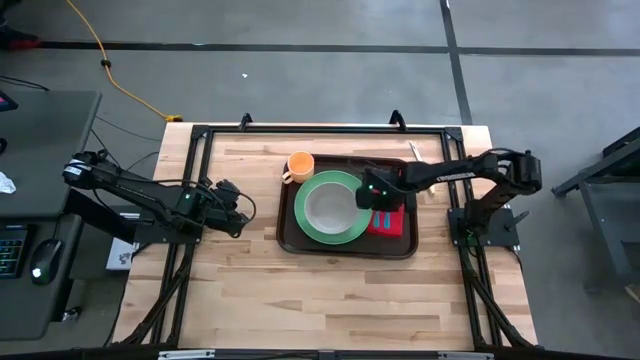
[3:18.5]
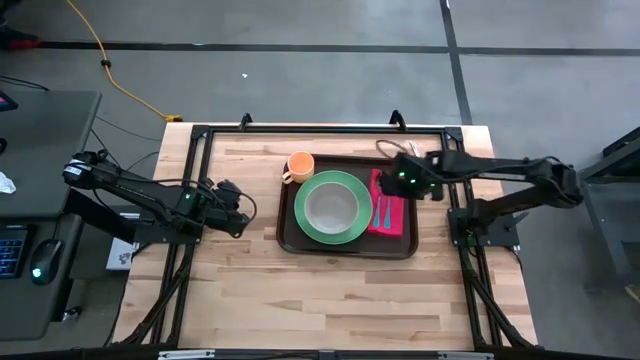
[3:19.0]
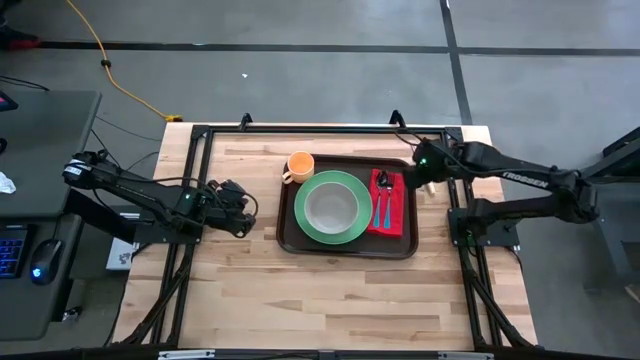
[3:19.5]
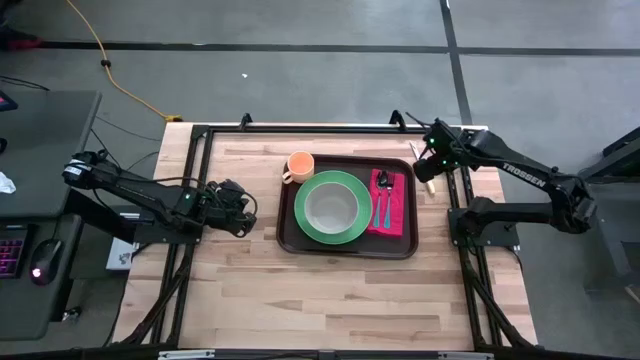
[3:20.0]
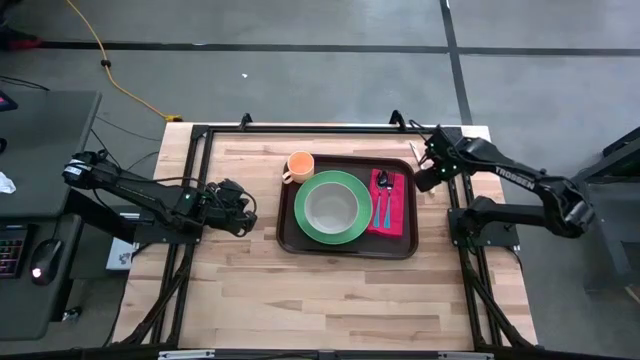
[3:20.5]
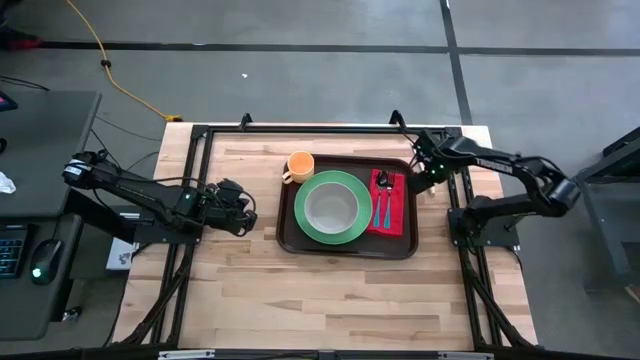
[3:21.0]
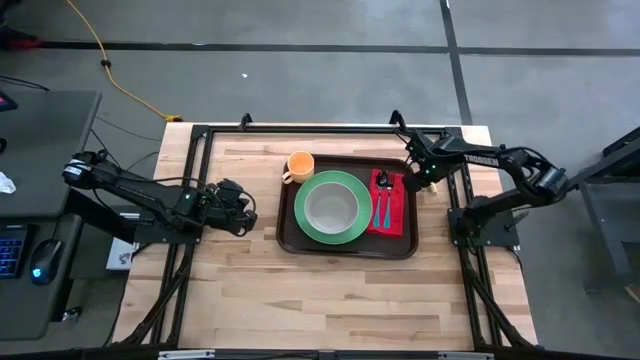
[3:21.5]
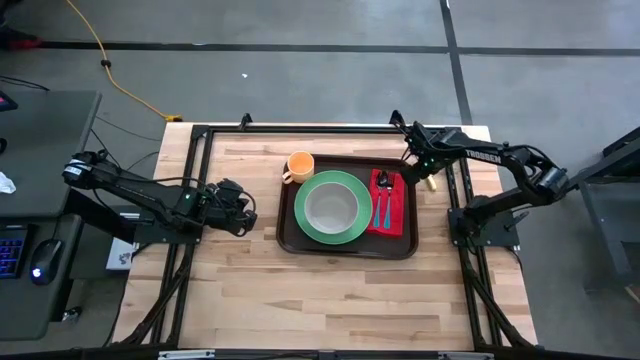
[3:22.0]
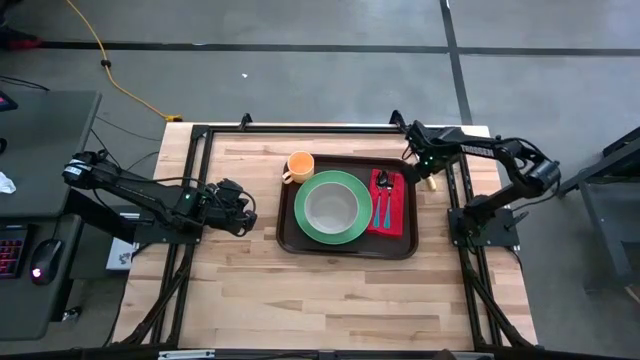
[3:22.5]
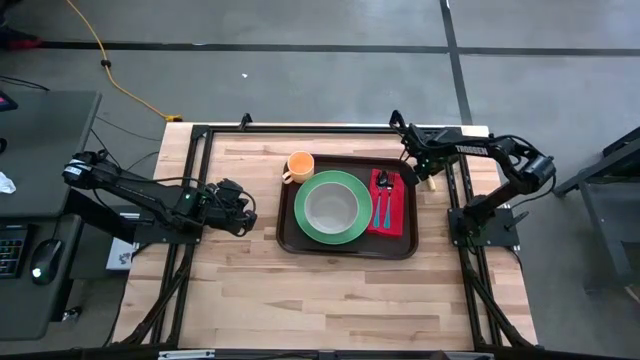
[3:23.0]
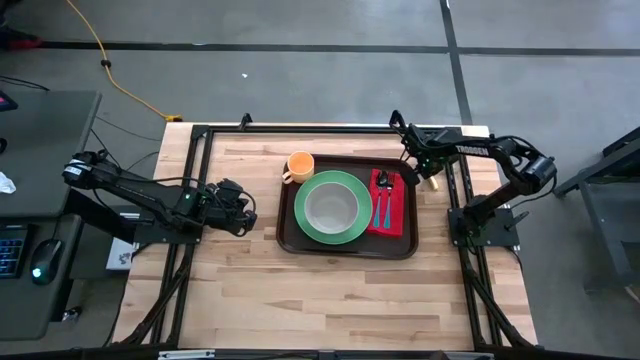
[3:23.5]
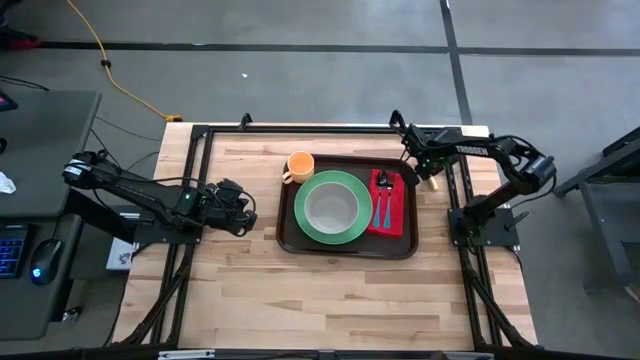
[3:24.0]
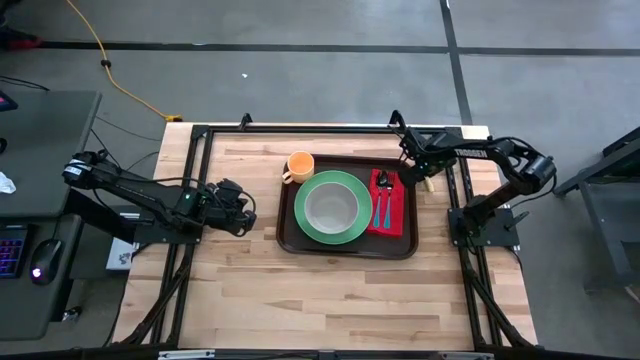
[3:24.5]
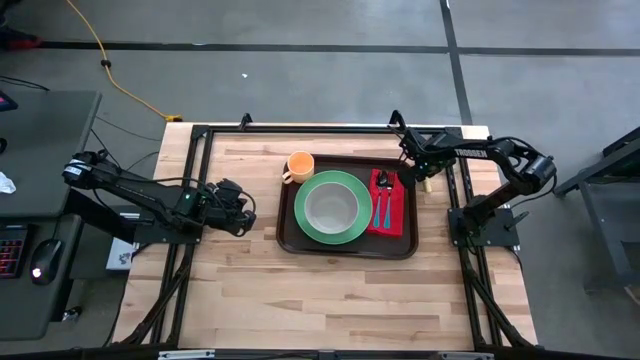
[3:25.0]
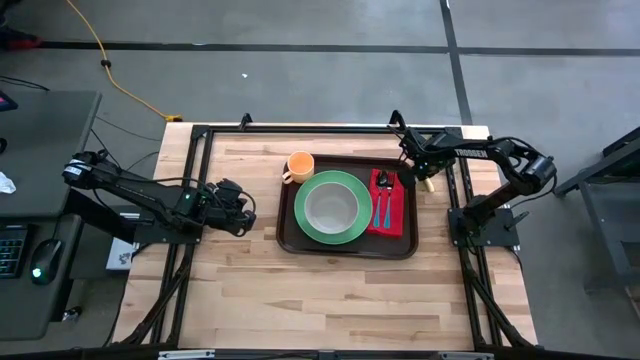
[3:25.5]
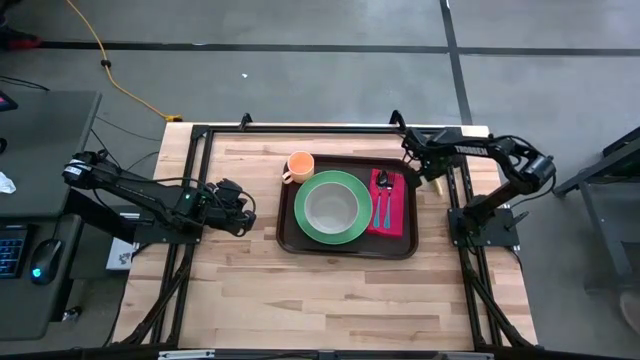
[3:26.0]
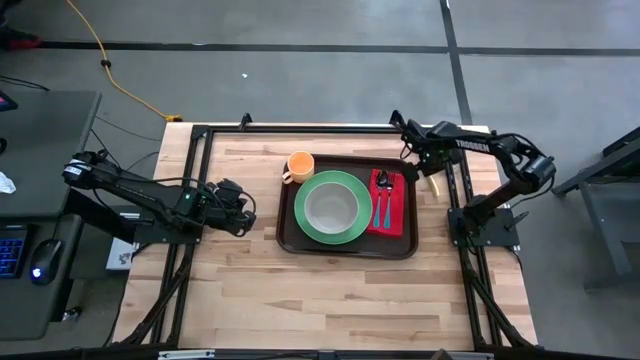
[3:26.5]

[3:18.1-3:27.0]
Task: Set up tray
Put the yellow table knife on the red napkin to the right of the blue fork

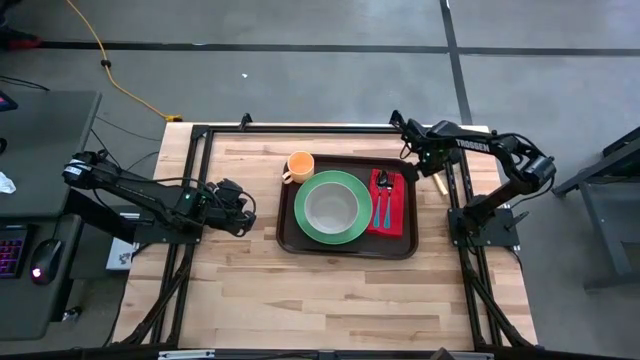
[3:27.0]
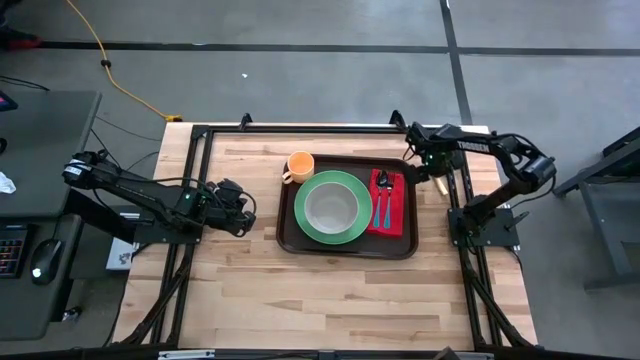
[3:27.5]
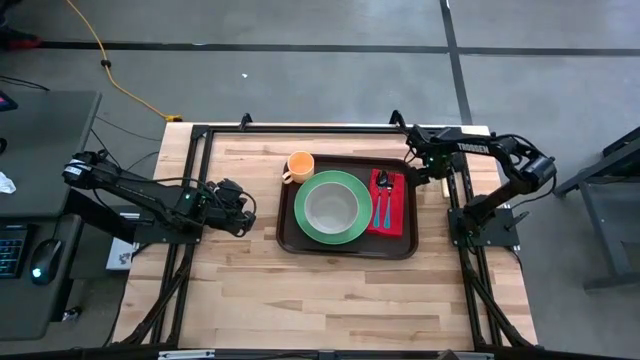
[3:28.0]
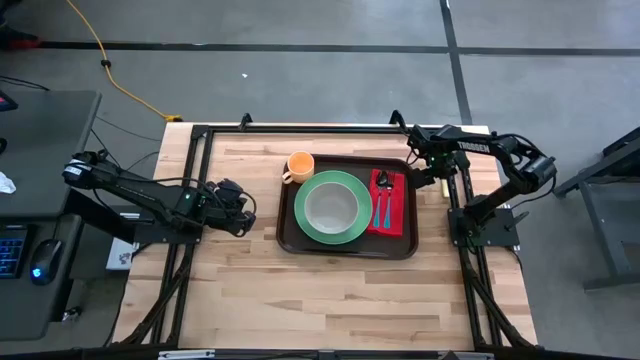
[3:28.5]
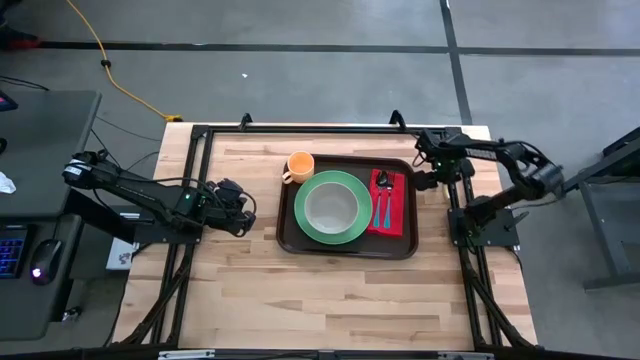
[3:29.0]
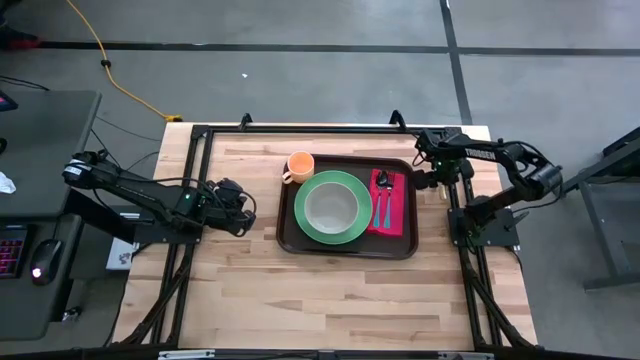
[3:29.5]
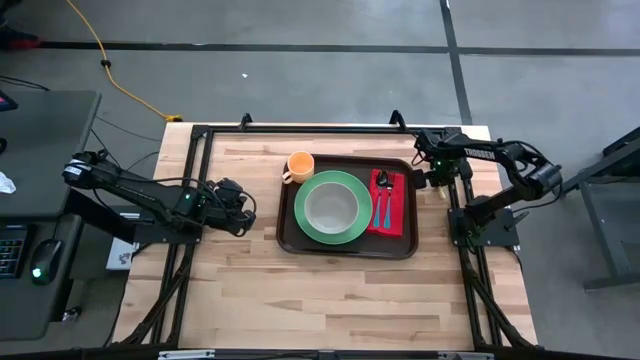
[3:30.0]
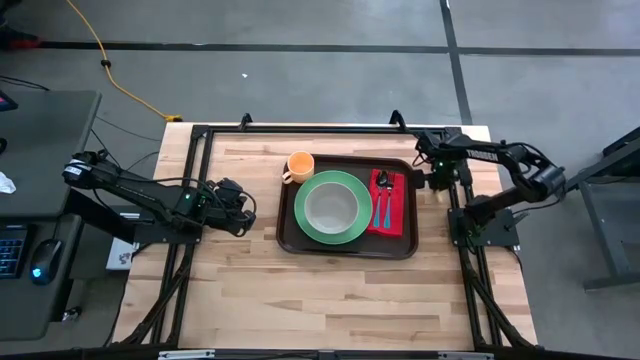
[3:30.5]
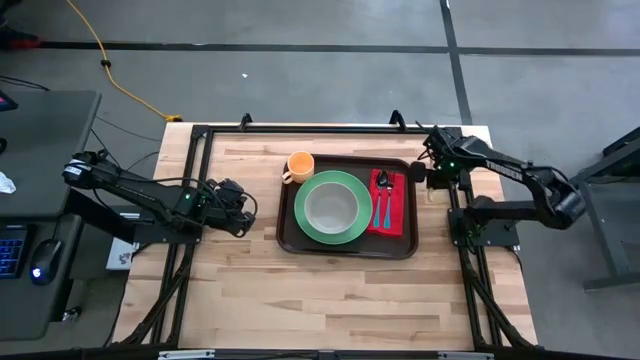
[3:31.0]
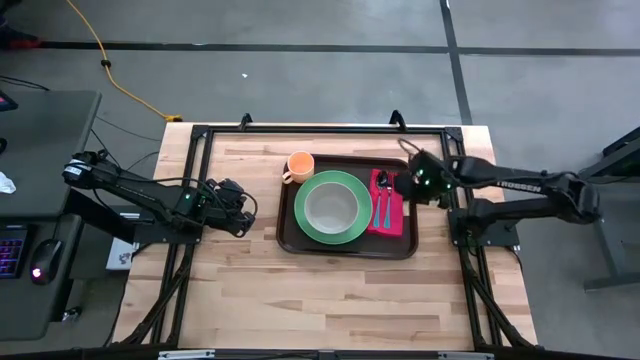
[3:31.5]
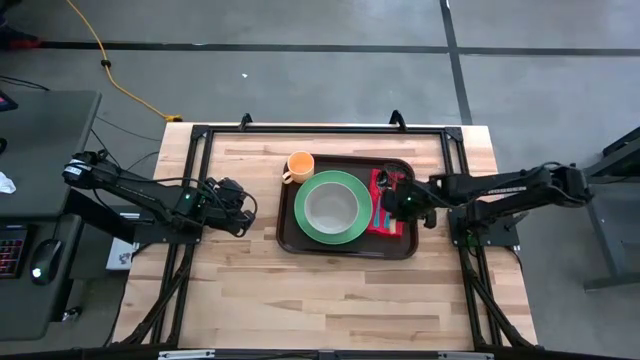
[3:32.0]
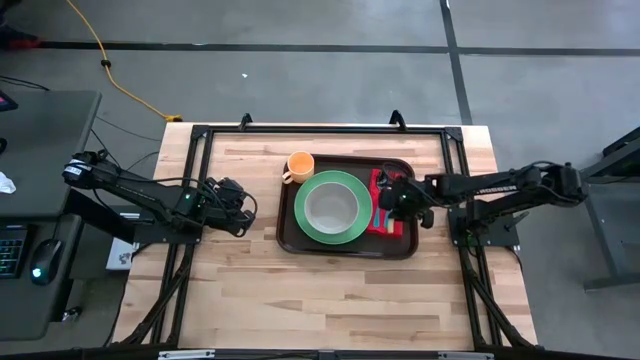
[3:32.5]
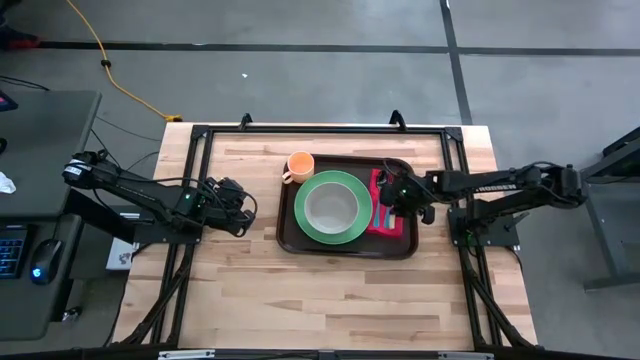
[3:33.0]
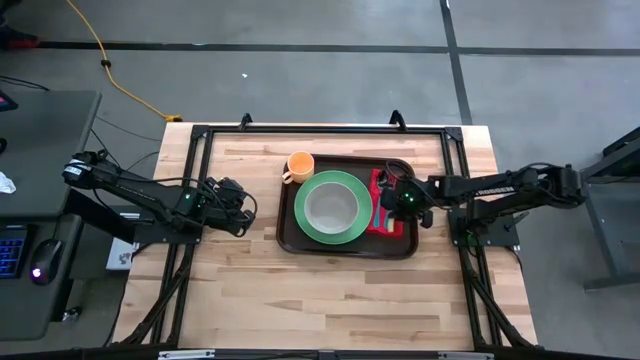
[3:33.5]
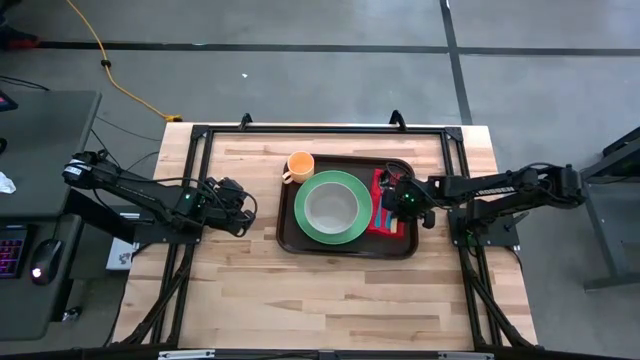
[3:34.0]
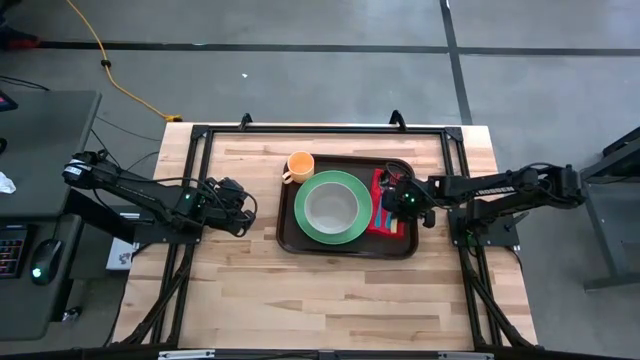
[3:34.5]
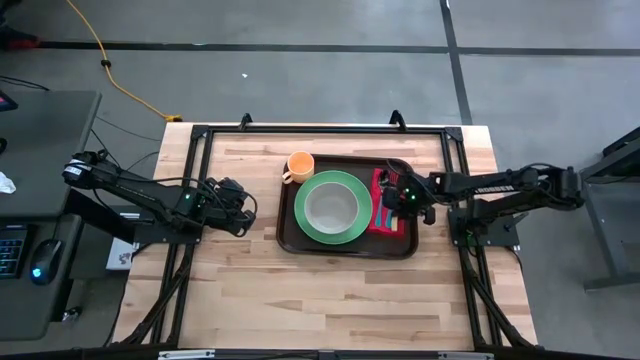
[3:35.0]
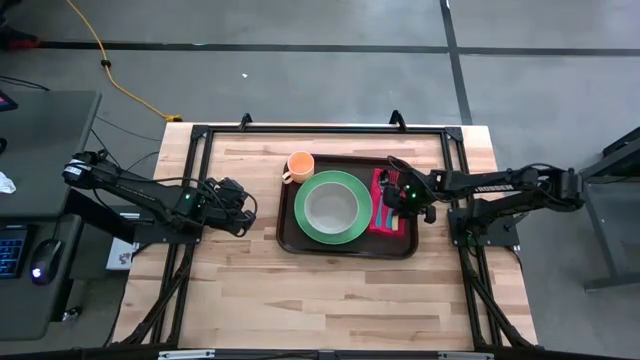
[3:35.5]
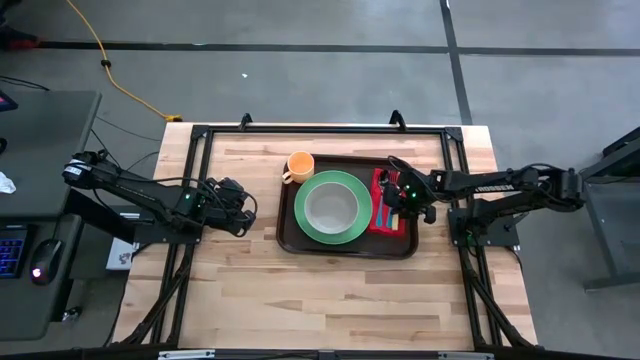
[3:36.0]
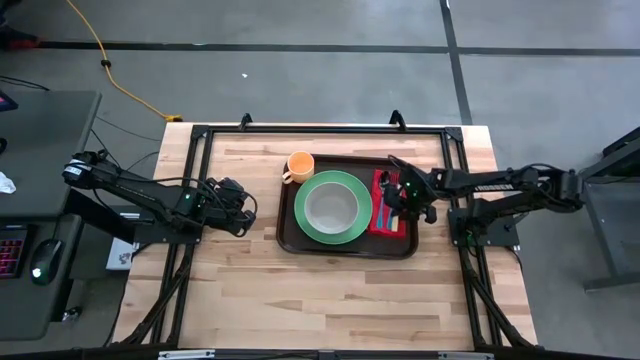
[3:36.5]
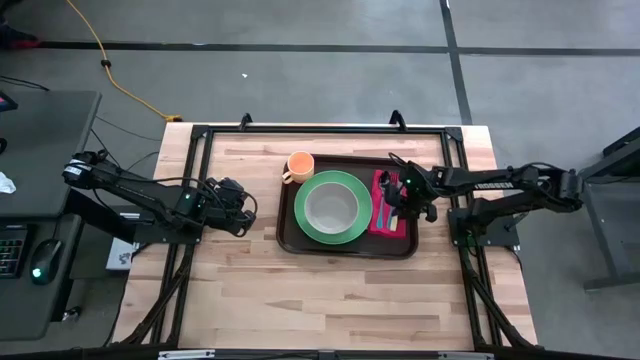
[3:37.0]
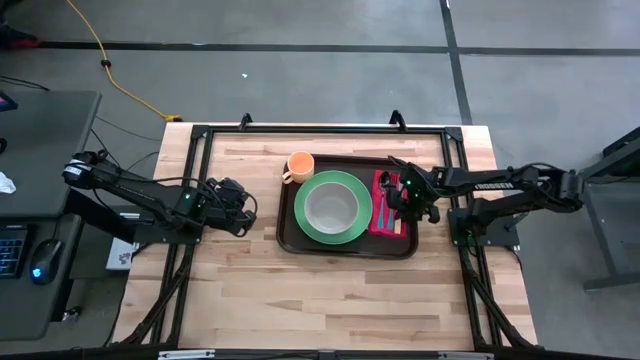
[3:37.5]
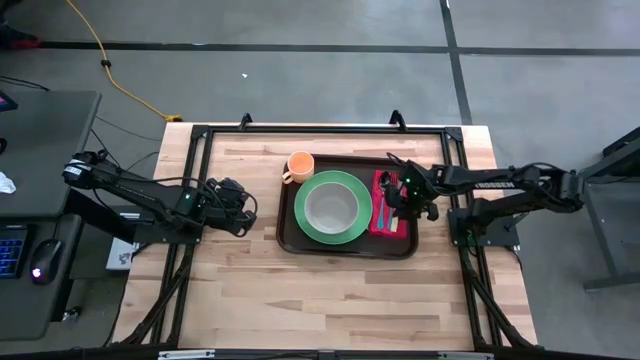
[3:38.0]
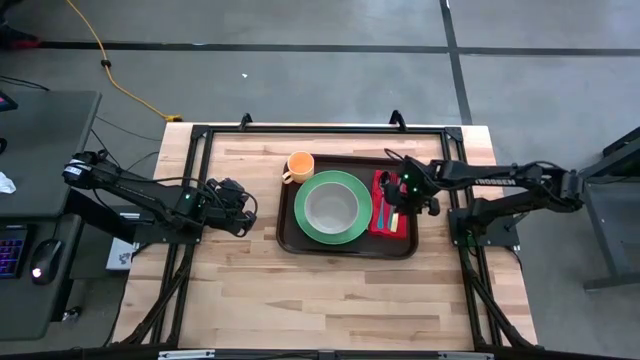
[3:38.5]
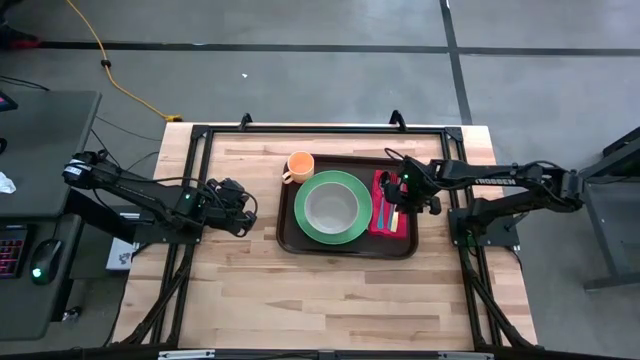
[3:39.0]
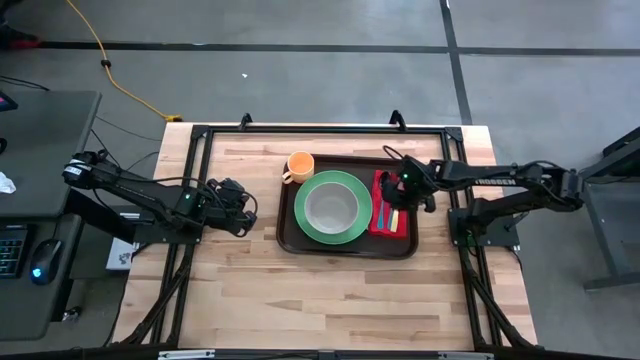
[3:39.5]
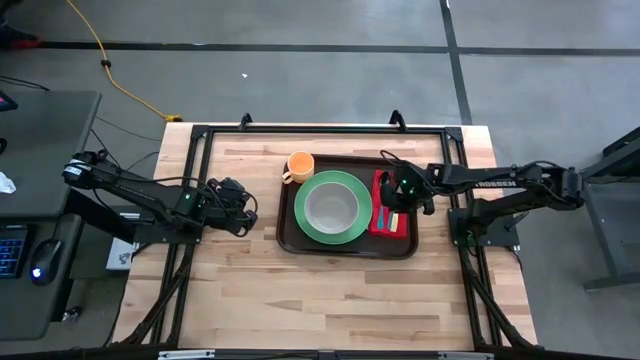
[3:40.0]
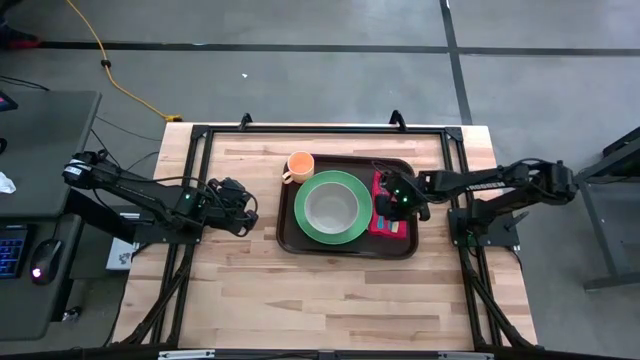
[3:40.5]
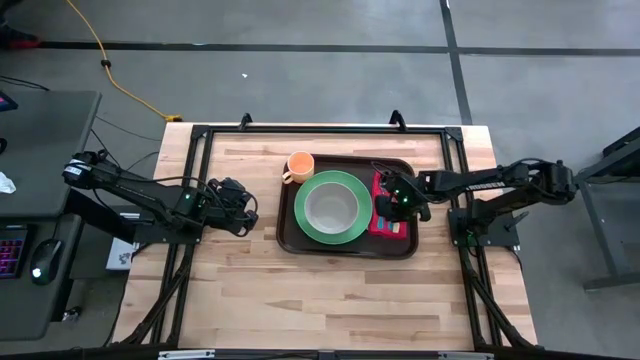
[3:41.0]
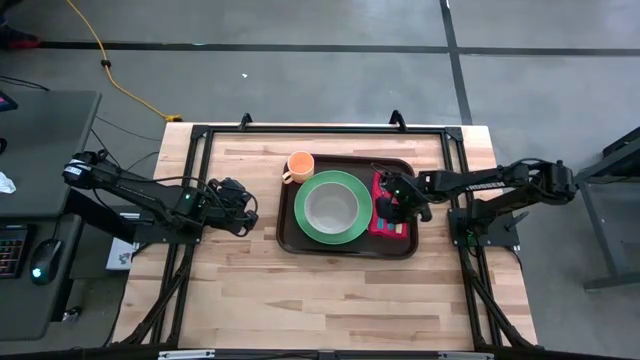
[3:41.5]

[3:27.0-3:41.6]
Put the yellow table knife on the red napkin to the right of the blue fork
